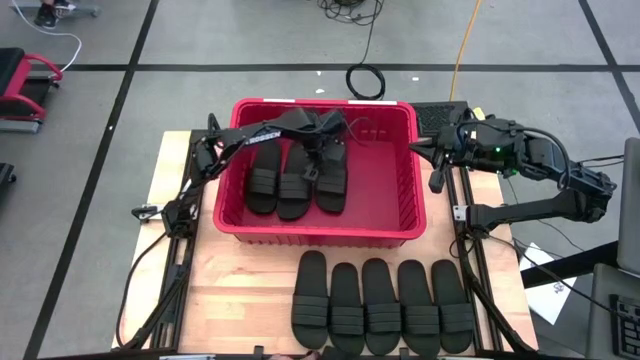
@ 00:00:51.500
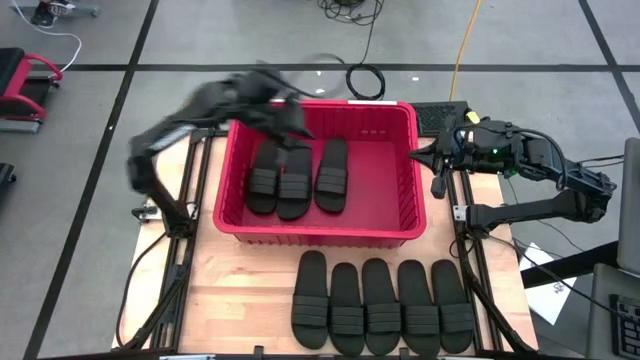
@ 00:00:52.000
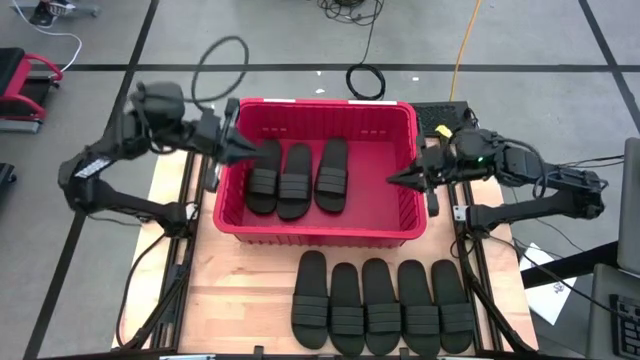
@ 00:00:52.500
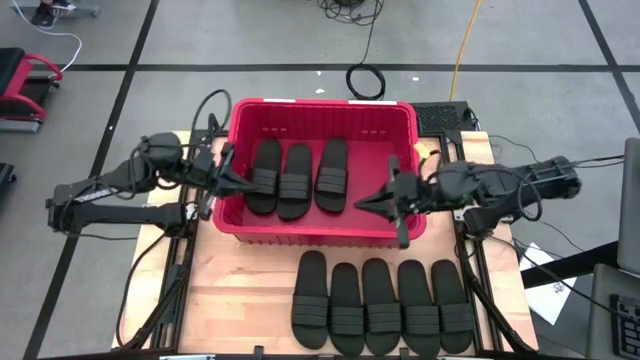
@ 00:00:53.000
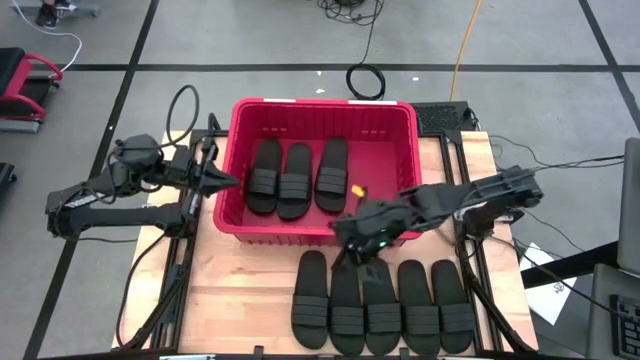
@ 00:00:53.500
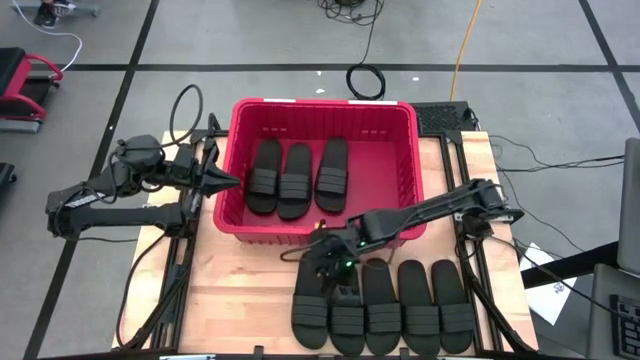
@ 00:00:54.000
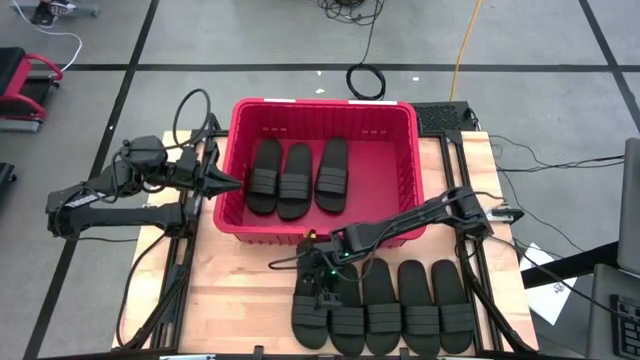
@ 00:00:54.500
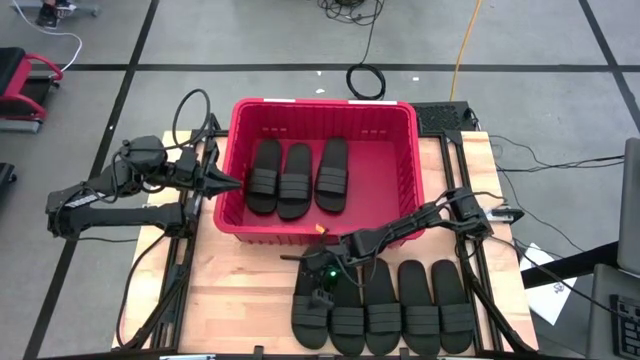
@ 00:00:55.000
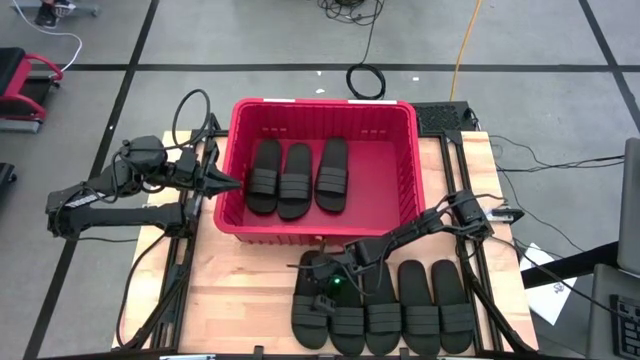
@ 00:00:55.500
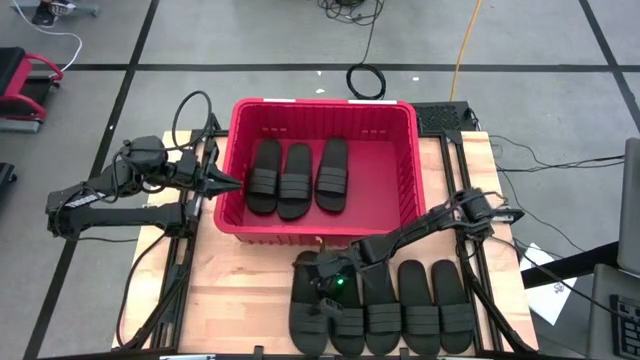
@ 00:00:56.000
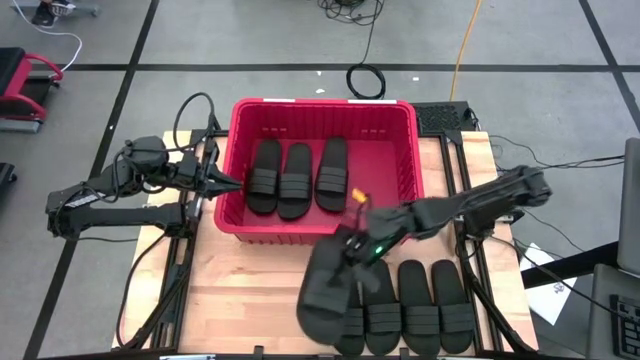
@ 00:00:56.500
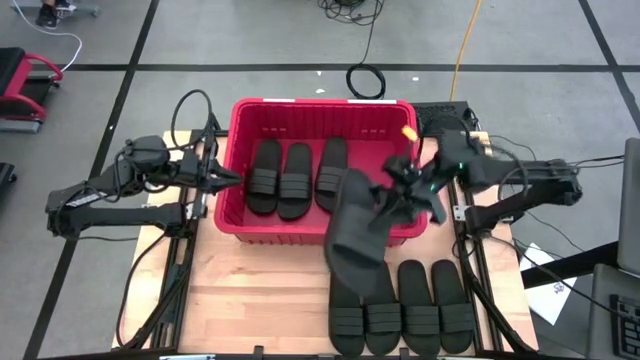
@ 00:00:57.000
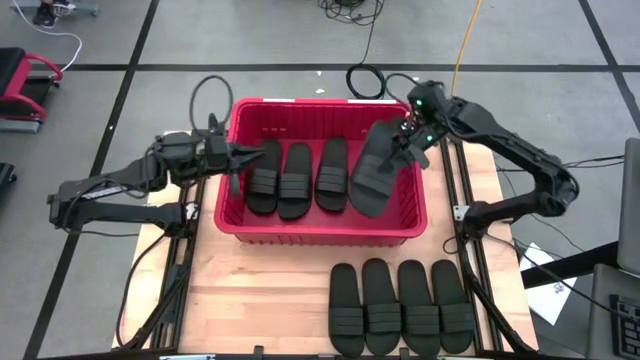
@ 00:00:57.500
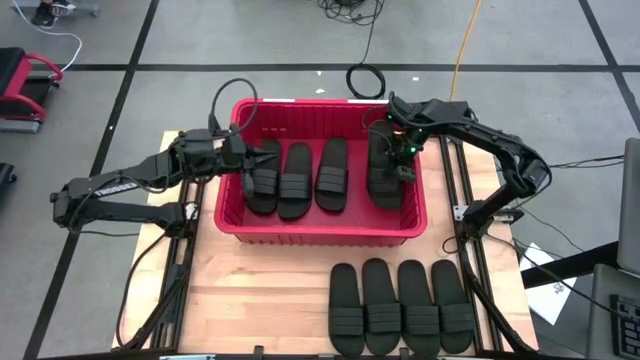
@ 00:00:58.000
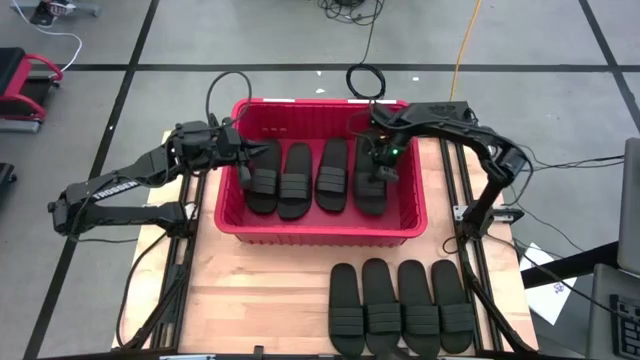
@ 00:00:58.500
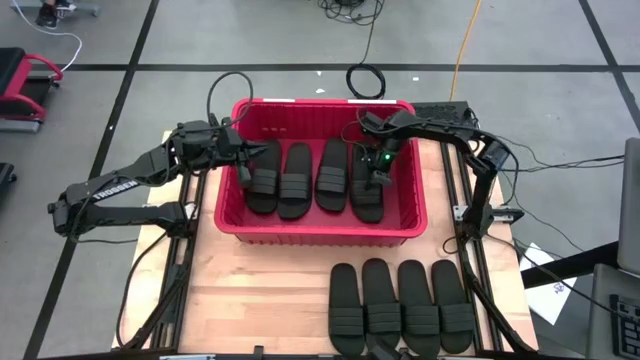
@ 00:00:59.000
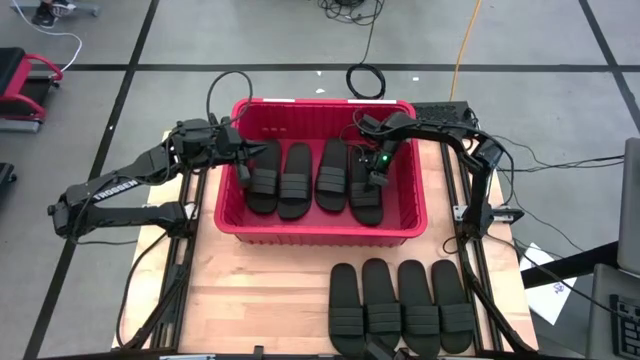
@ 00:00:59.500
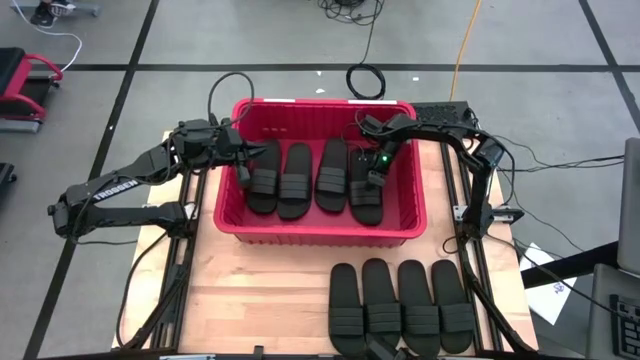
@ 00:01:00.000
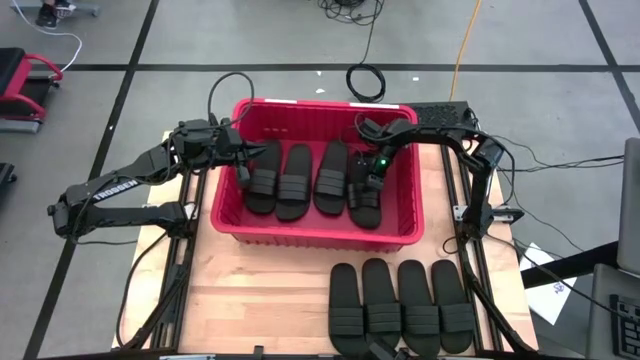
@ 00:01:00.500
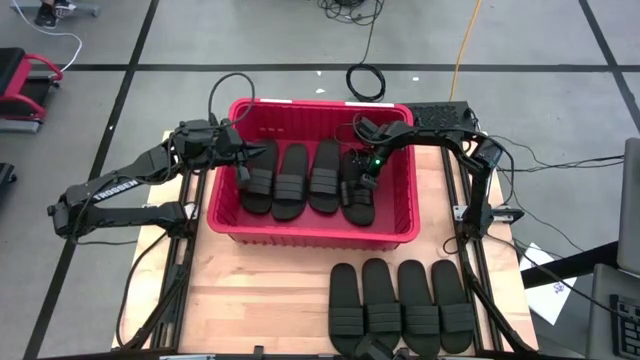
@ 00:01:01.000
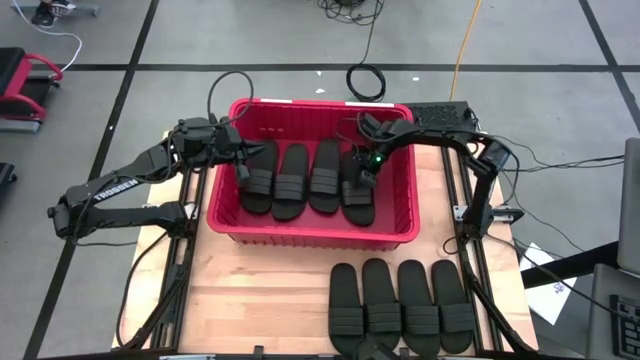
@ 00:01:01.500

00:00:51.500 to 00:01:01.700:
Task: Pick and place slides into bin
Put the black slide into the red bin

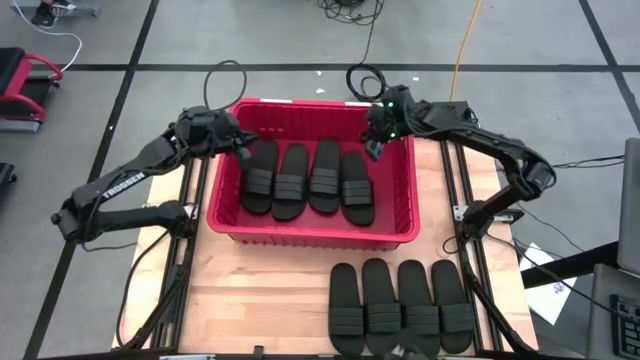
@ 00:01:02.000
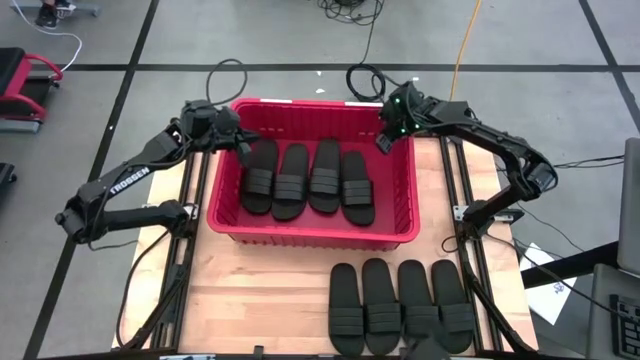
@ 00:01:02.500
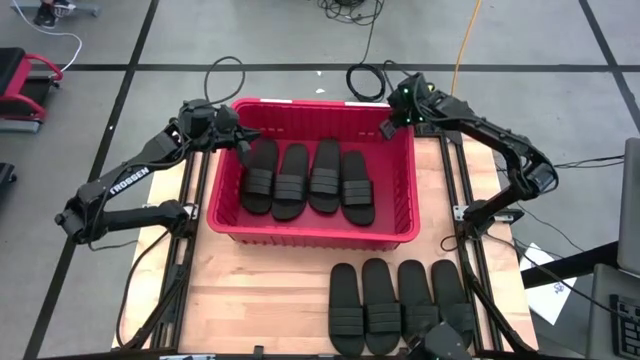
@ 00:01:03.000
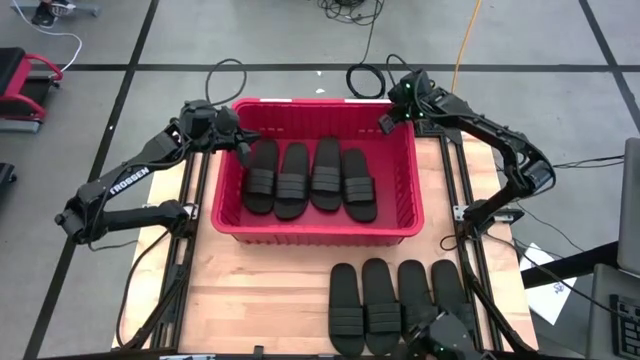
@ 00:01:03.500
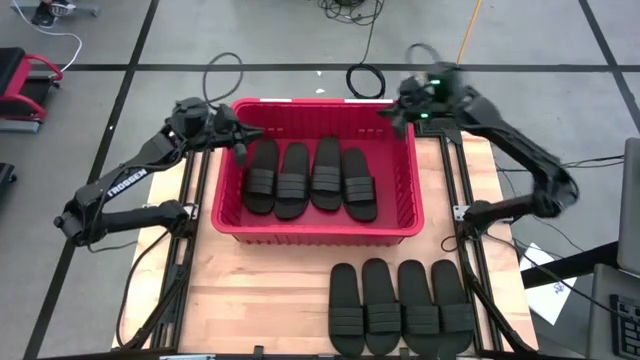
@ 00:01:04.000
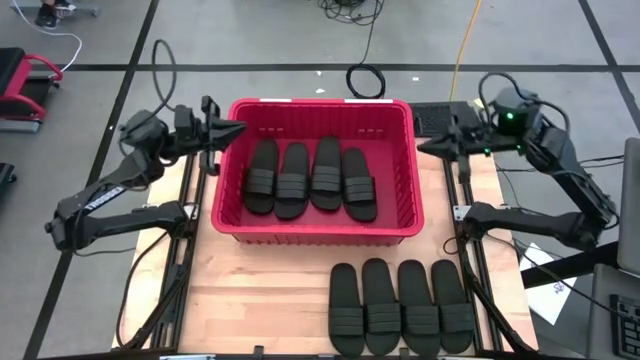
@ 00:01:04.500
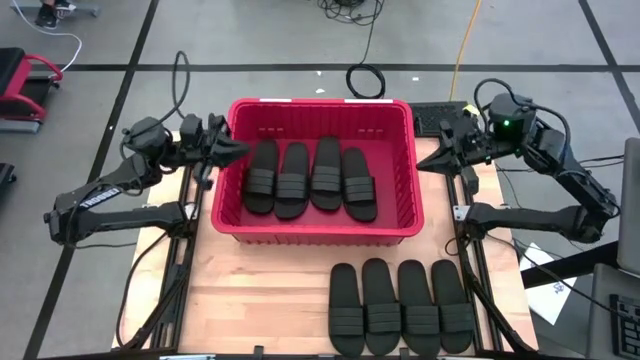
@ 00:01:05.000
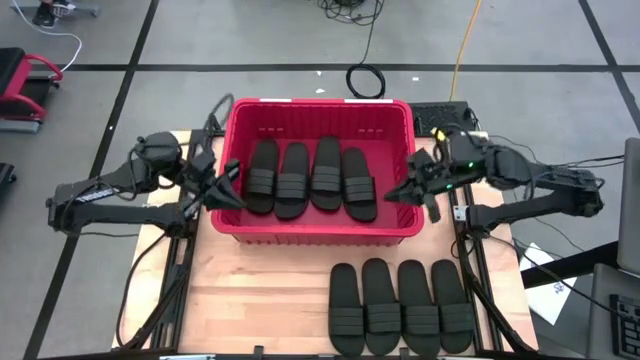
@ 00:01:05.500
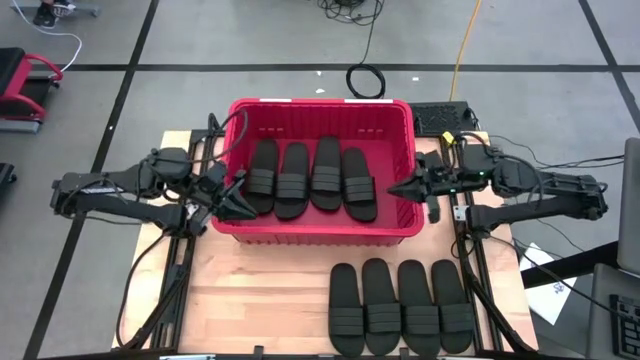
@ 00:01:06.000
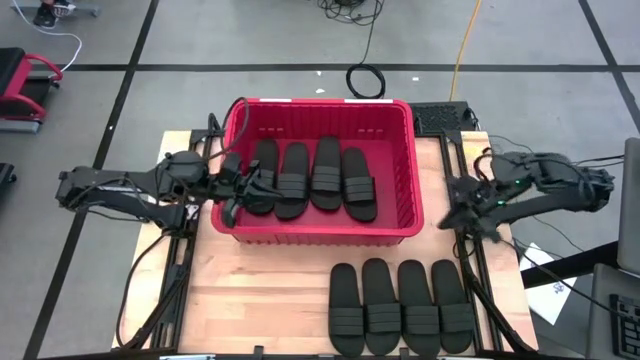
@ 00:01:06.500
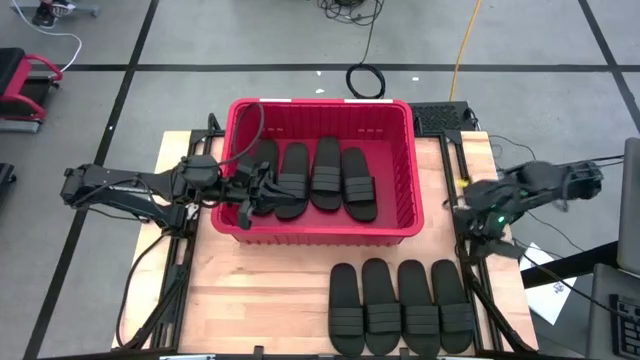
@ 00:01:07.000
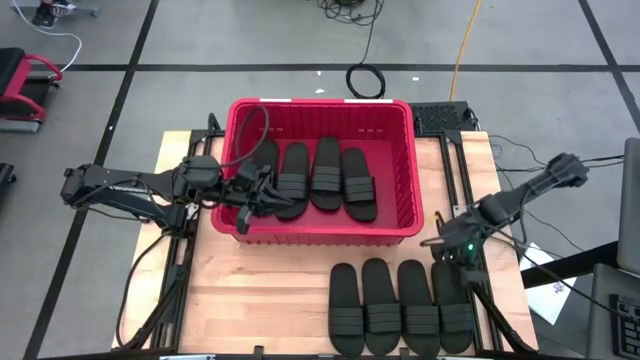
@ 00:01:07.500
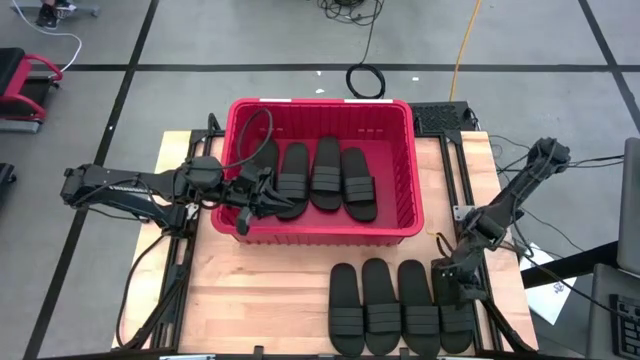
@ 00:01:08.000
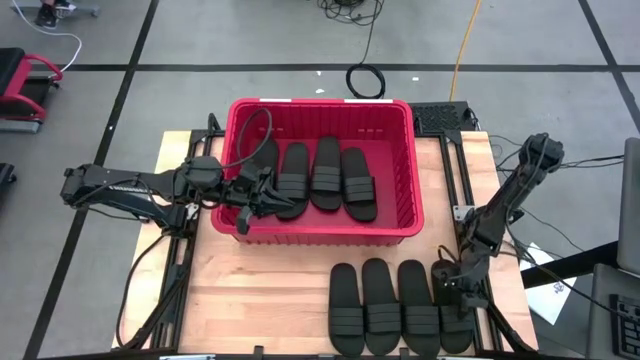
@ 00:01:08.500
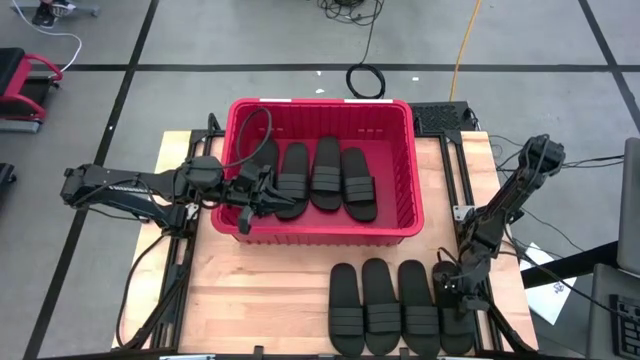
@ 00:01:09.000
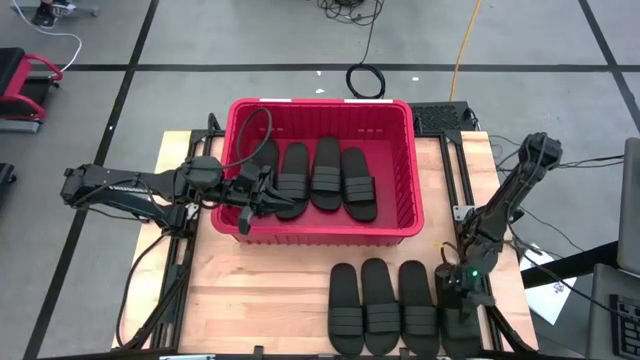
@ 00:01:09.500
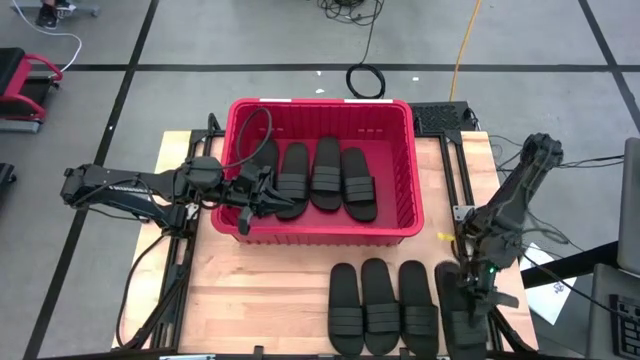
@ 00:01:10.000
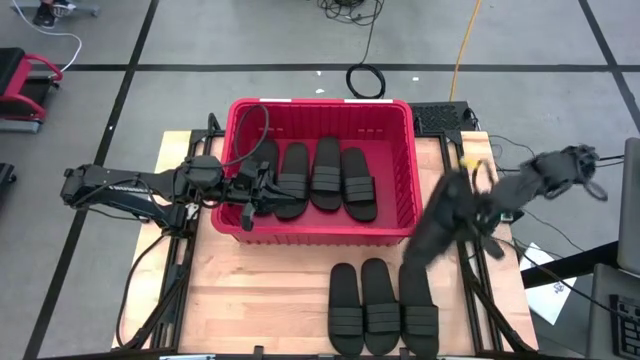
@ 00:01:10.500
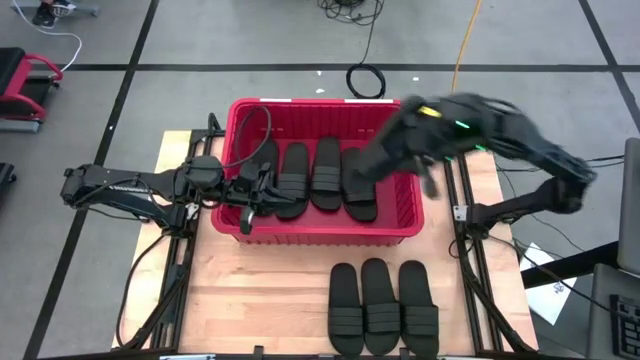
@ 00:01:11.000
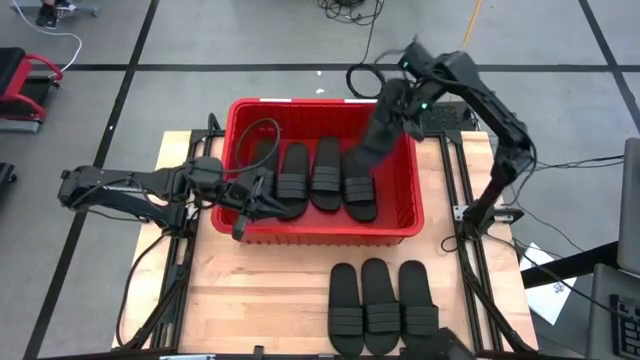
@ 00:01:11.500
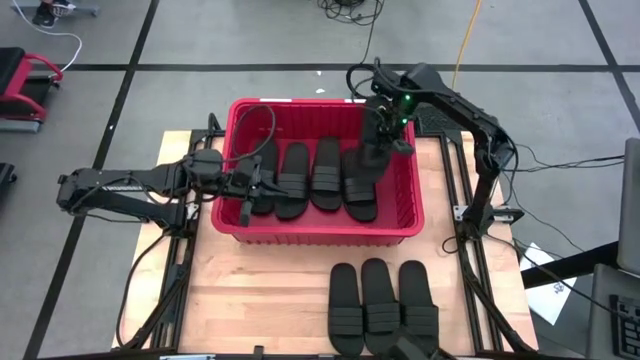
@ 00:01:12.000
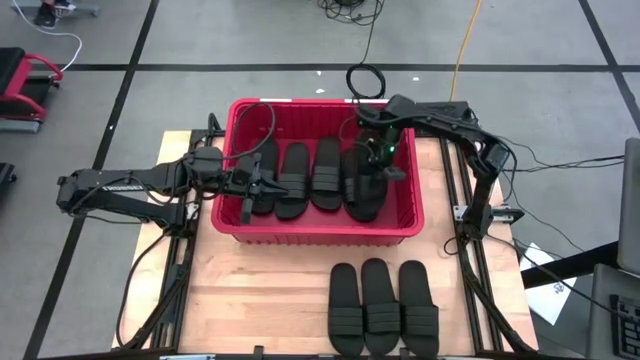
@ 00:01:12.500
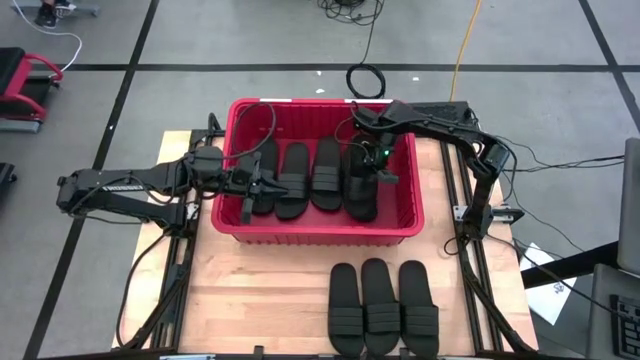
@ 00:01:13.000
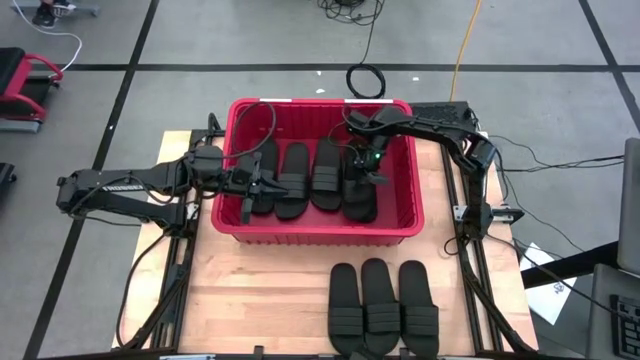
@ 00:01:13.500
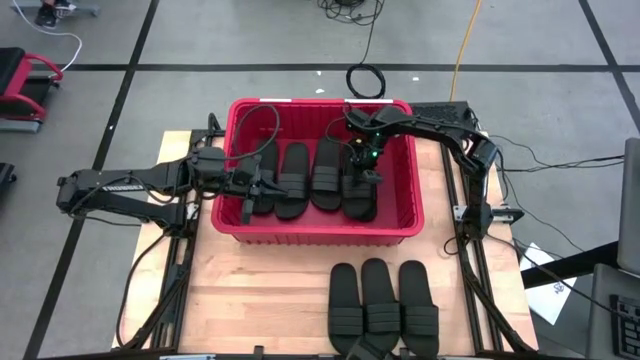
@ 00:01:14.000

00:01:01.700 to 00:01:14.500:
Put the black slide into the red bin
